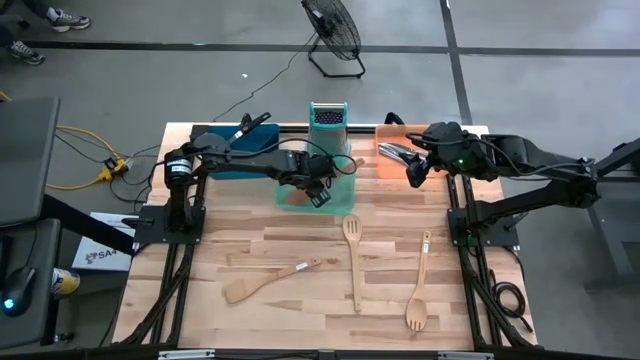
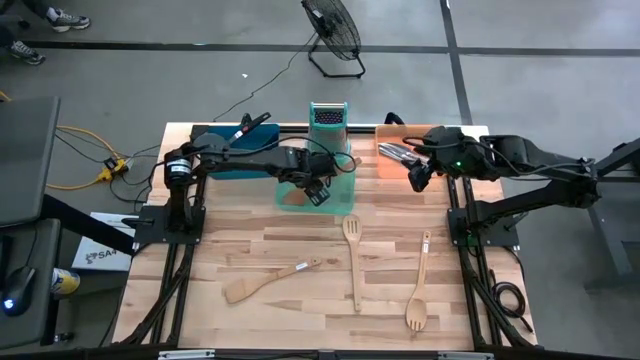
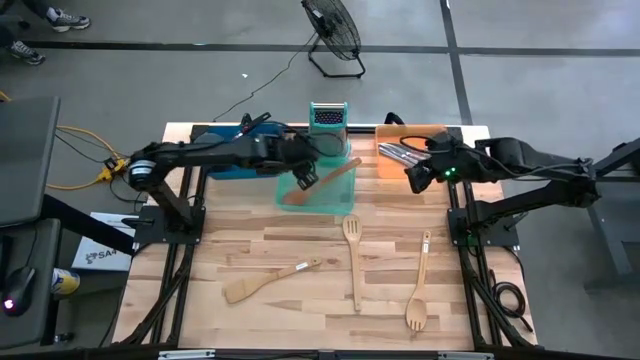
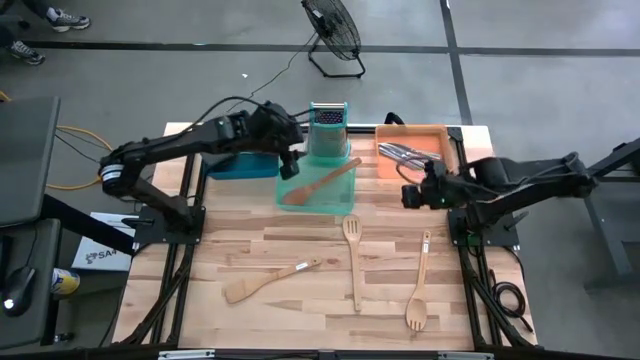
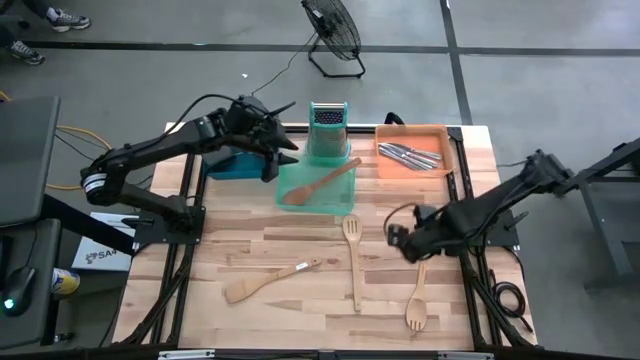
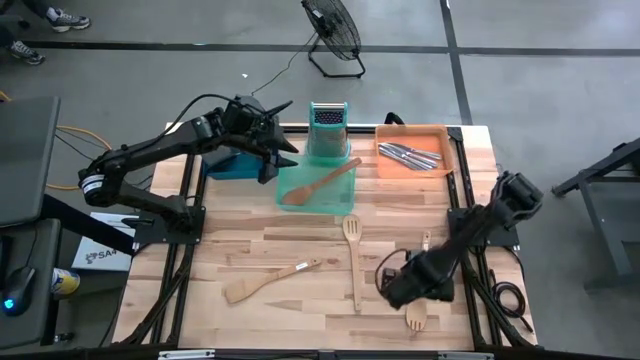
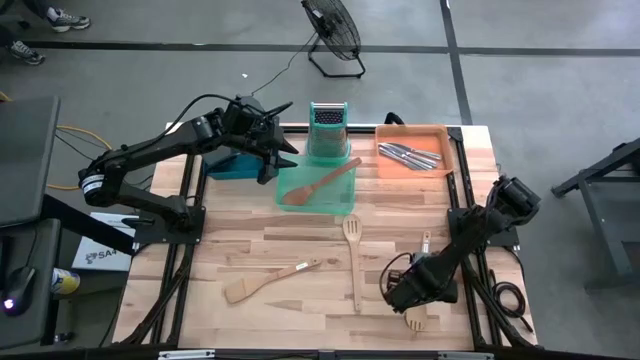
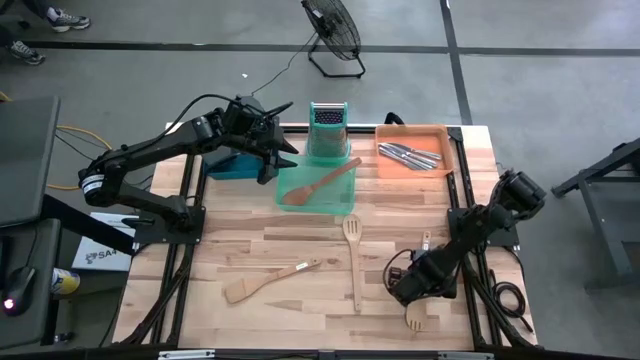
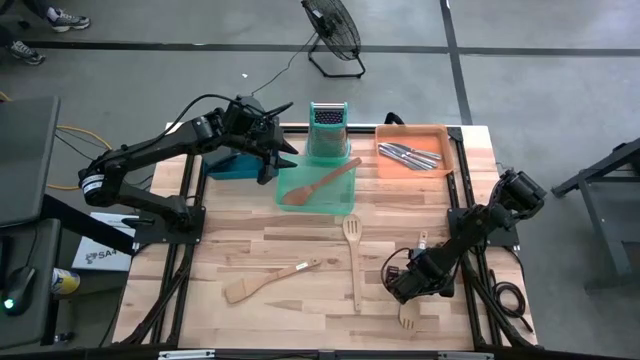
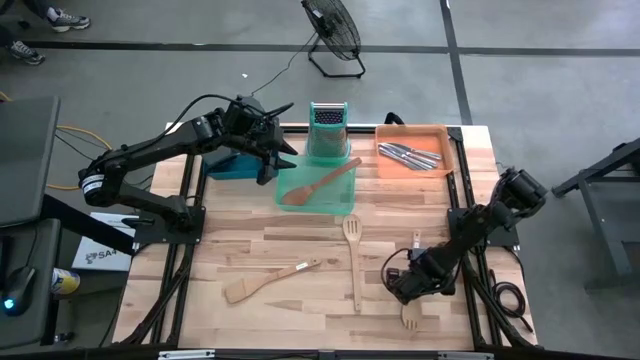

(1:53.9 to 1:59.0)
Task: Pick & Place Kitchen Items
Put the wooden spoon into the green bin

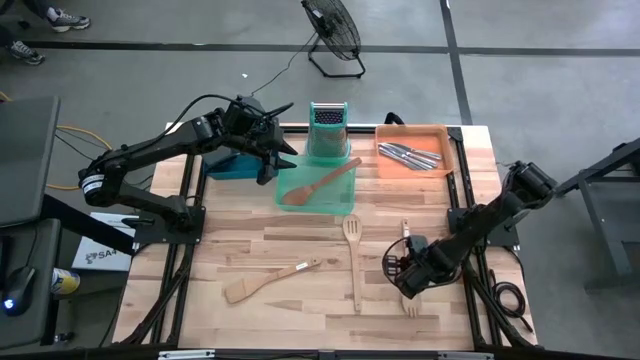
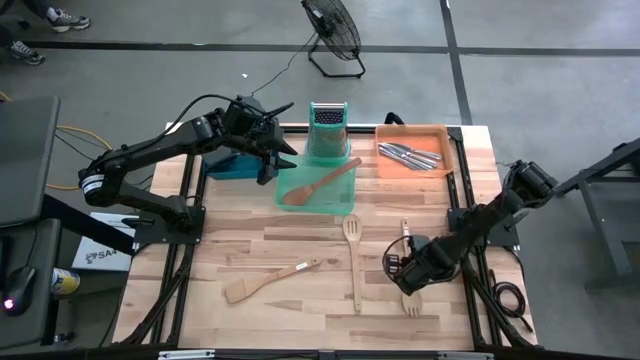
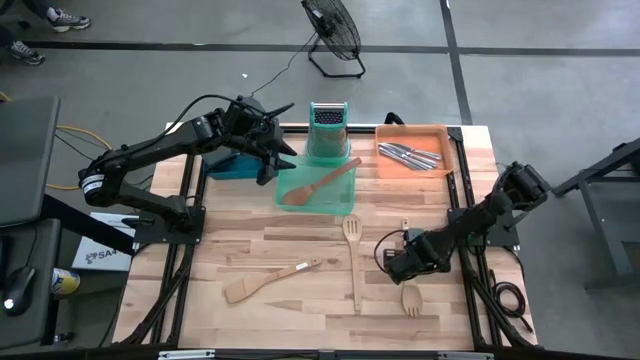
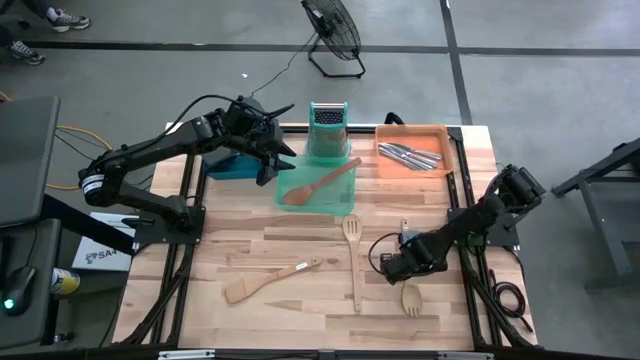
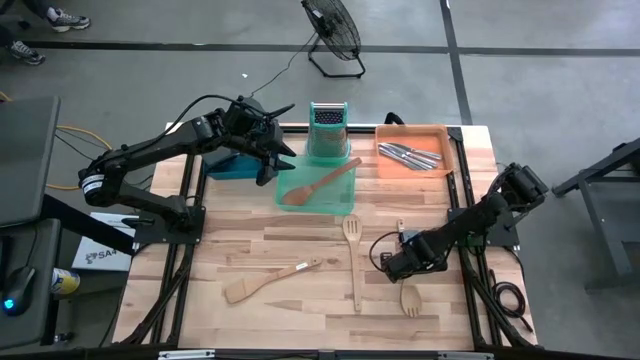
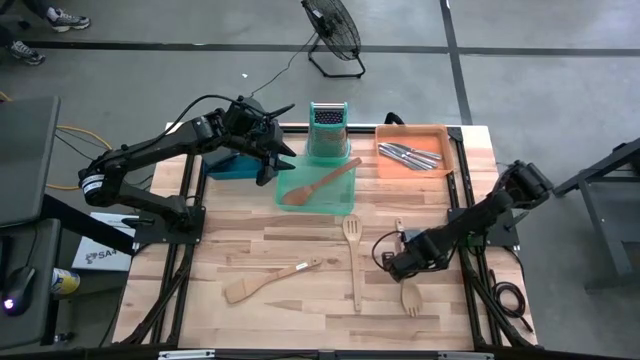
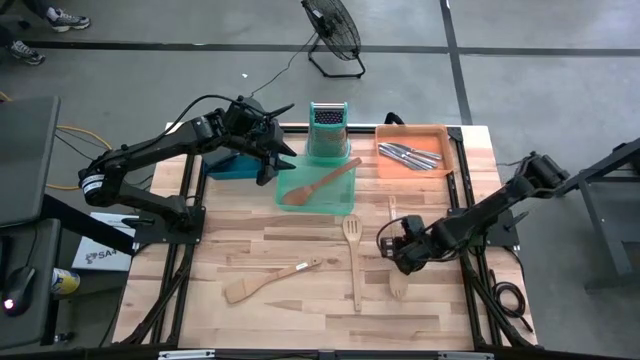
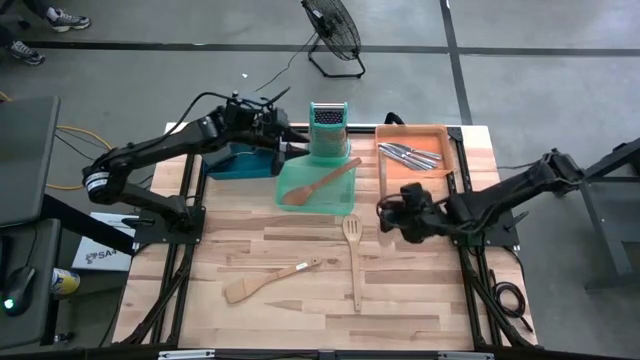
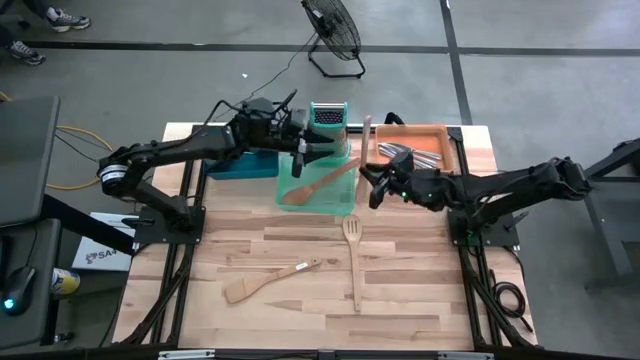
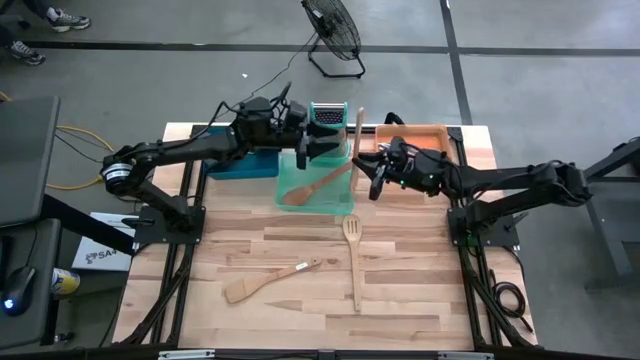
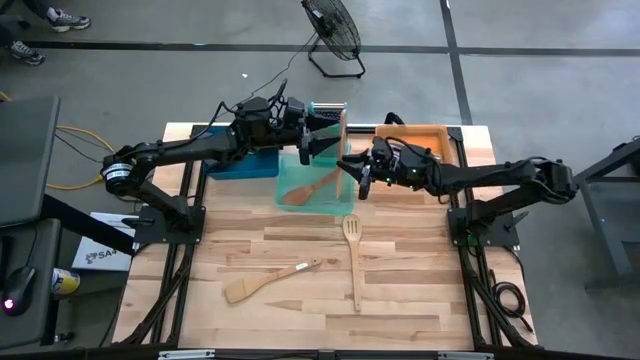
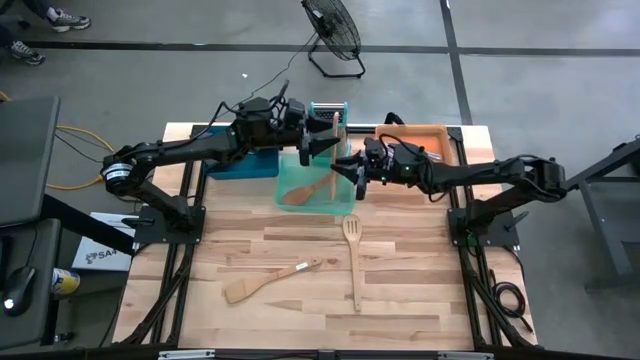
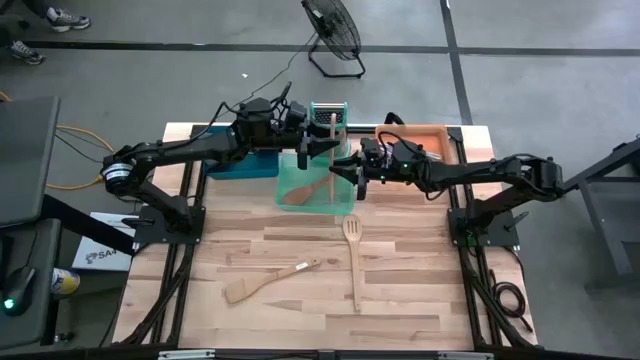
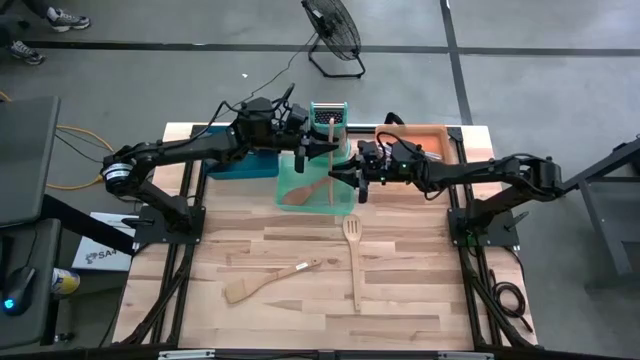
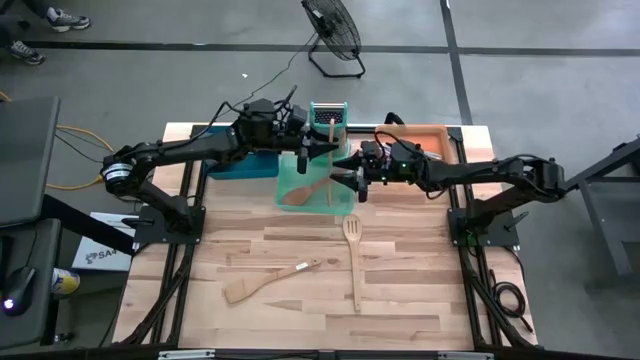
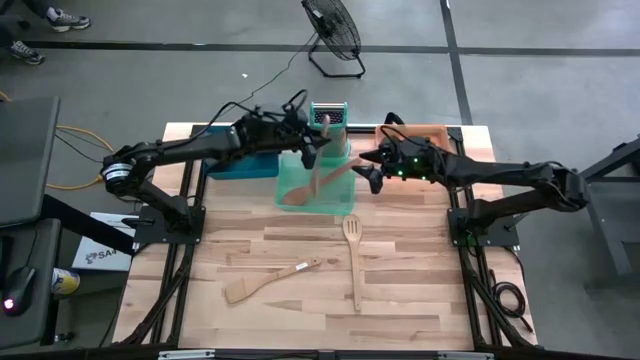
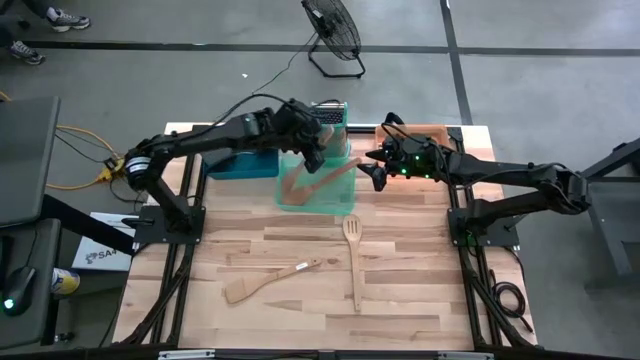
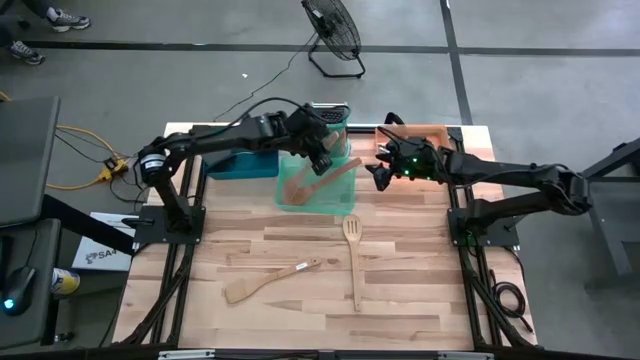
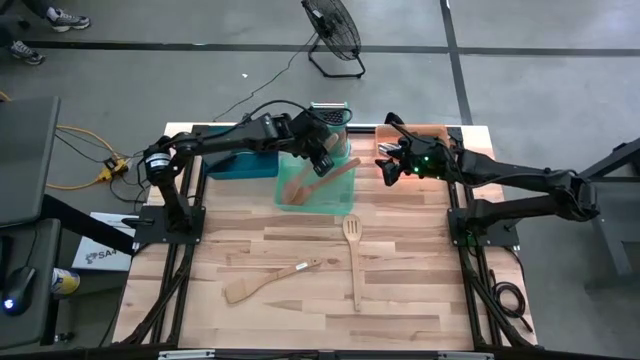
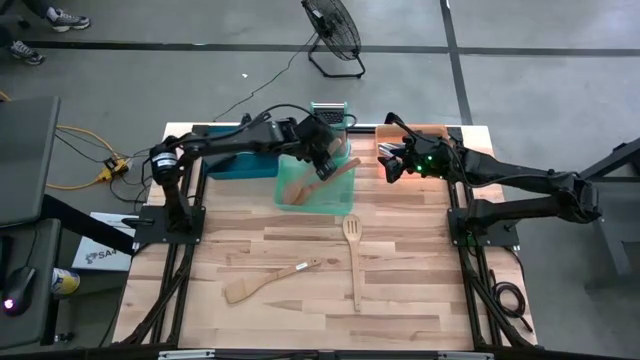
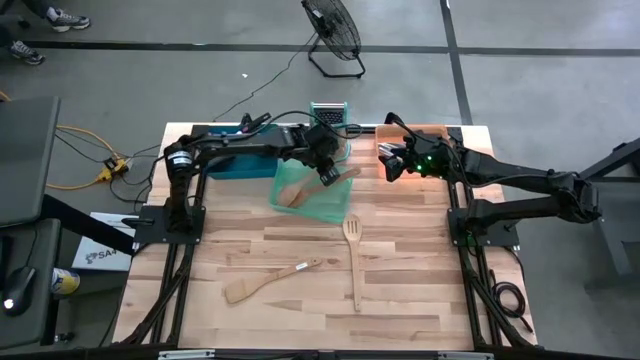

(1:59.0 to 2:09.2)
Put the wooden spoon into the green bin

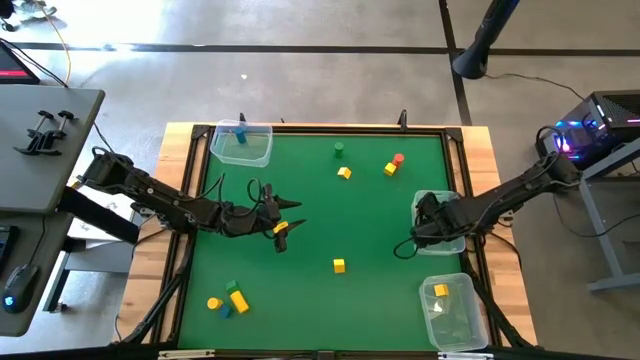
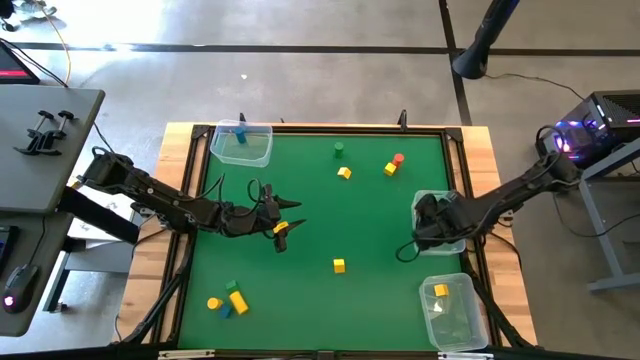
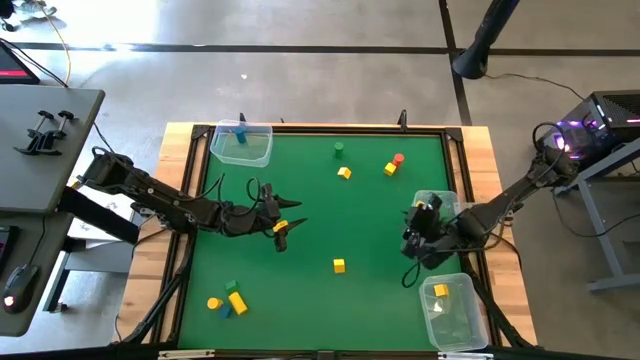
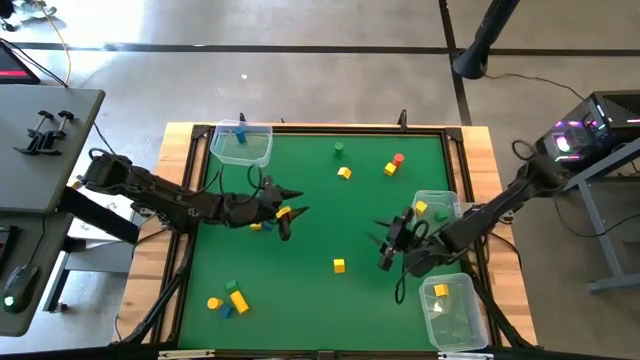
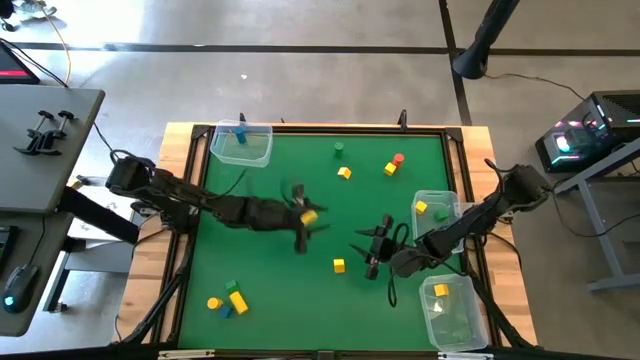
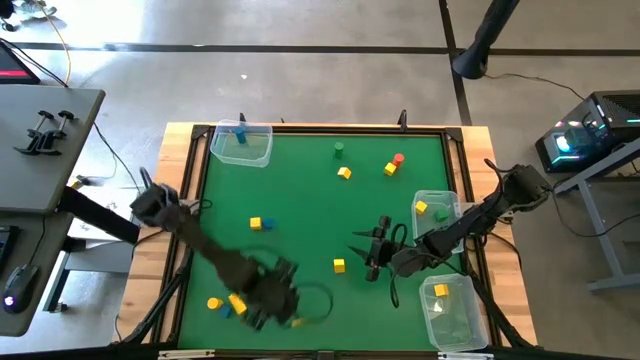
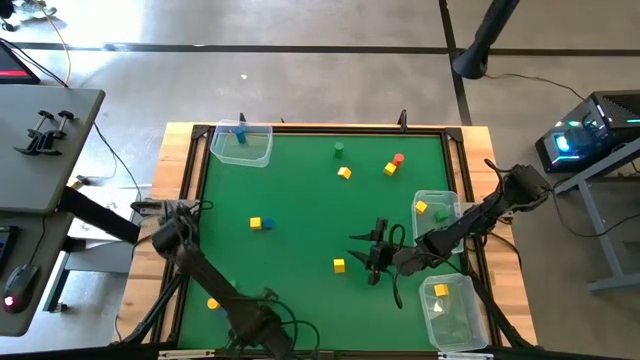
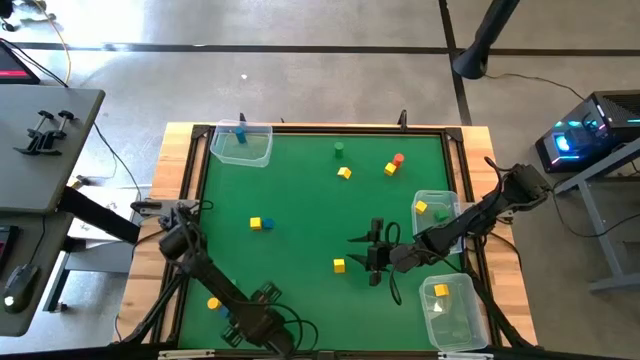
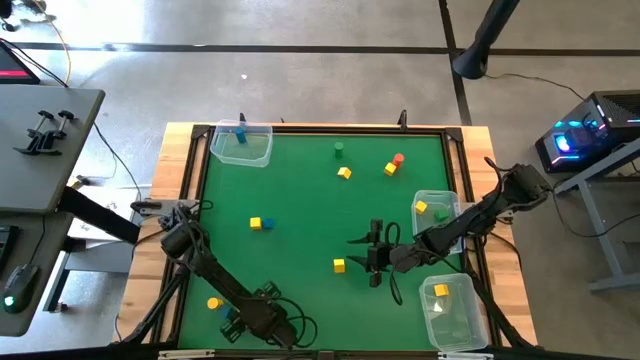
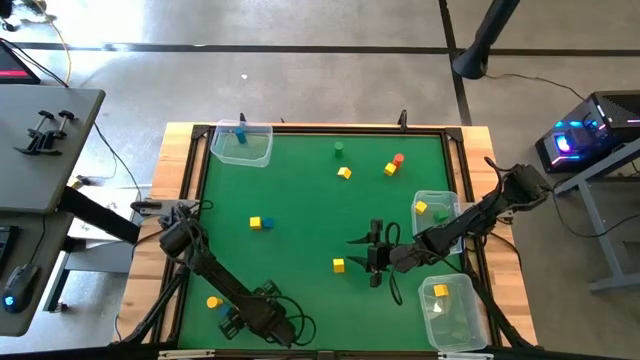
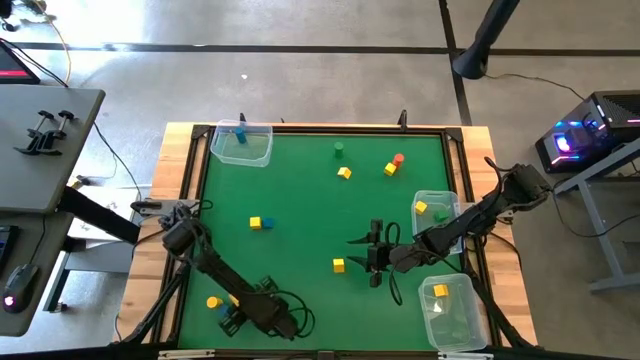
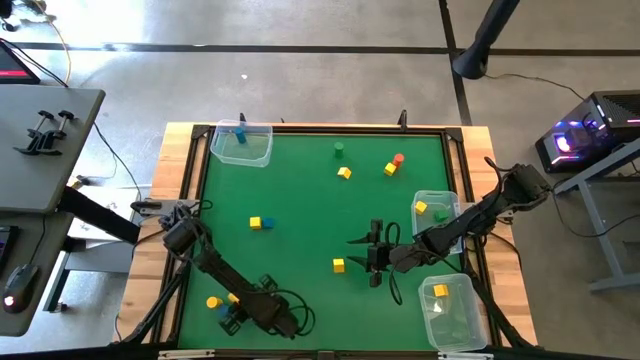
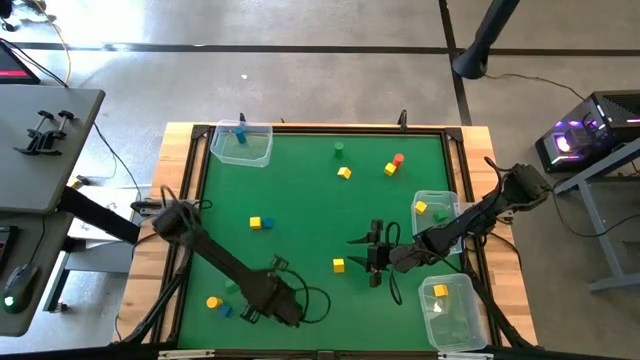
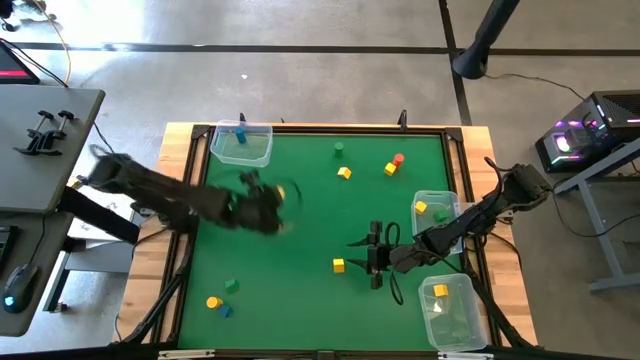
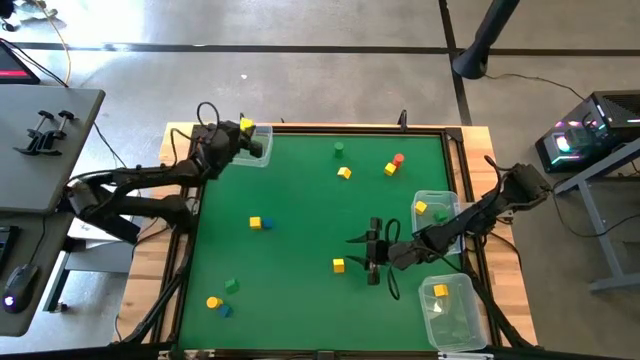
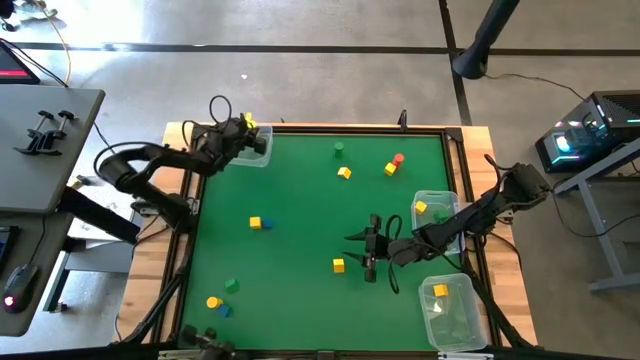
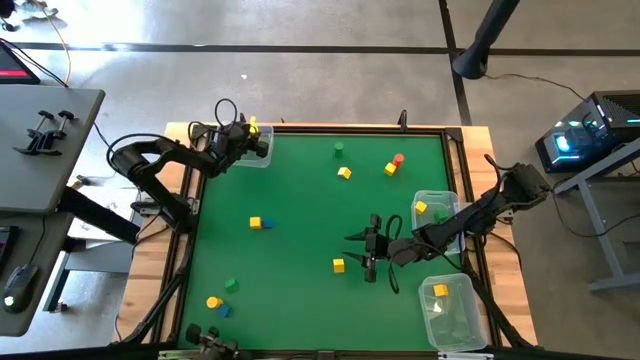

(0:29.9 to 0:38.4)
Task: Sort blocks by size
Put the right yellow cylindrical block into the top transparent bin
